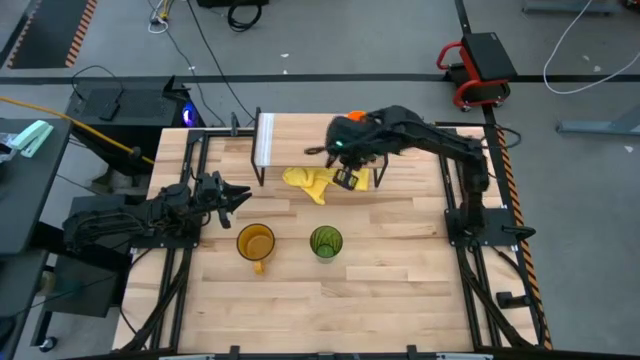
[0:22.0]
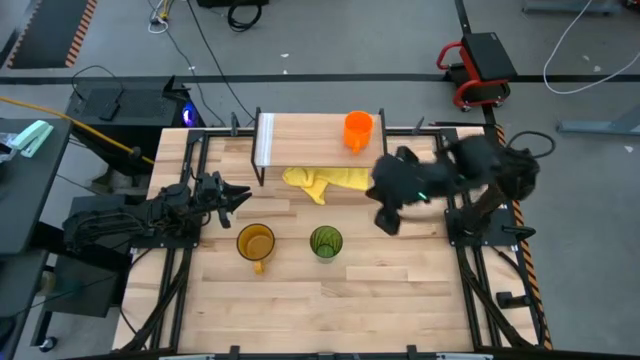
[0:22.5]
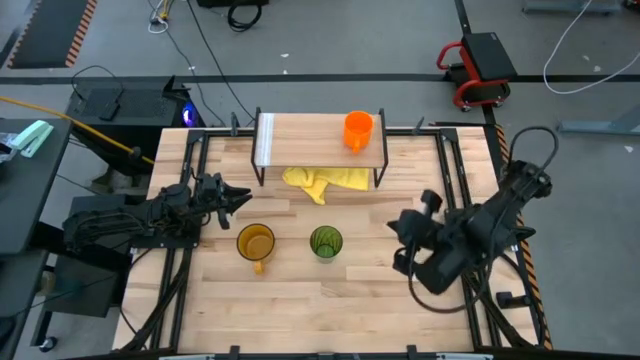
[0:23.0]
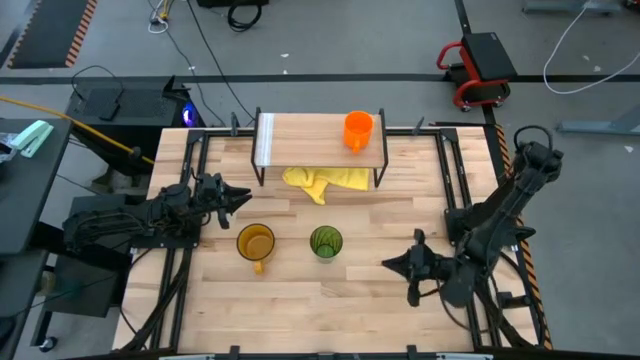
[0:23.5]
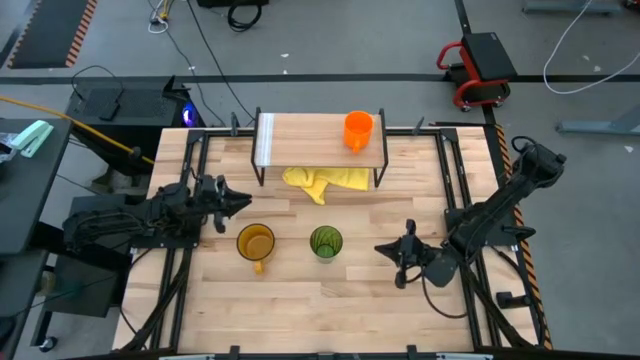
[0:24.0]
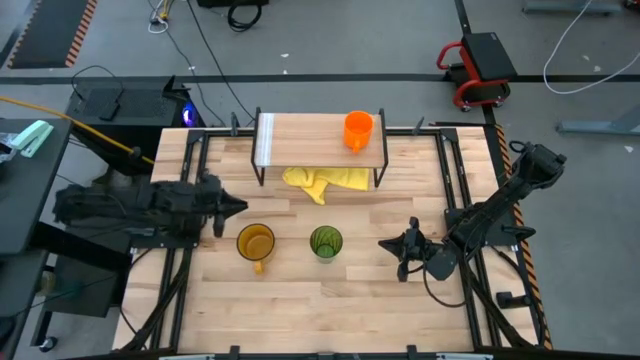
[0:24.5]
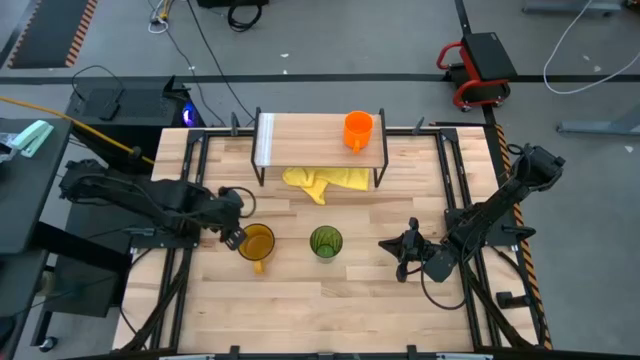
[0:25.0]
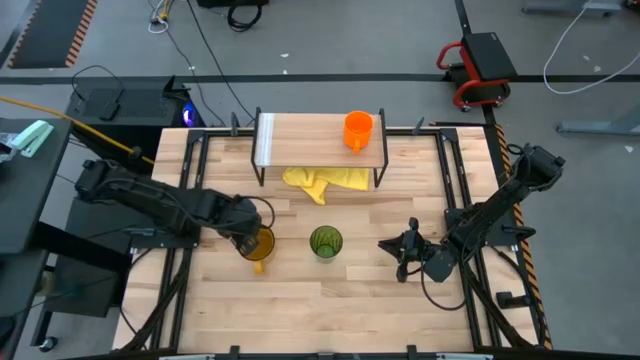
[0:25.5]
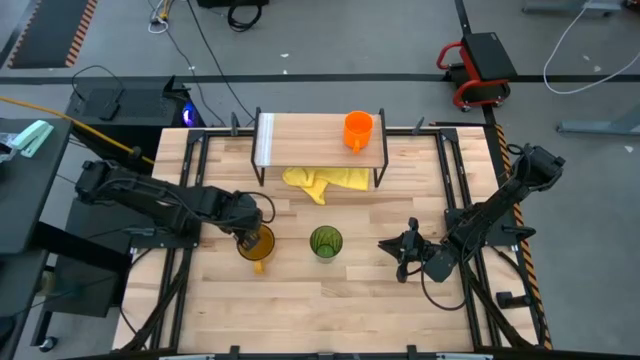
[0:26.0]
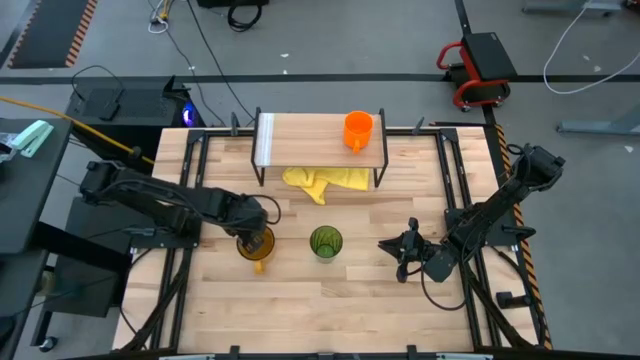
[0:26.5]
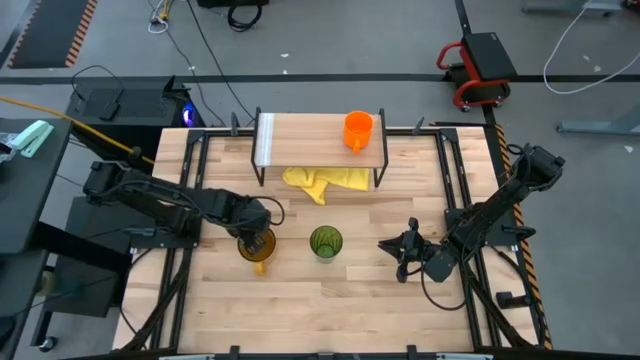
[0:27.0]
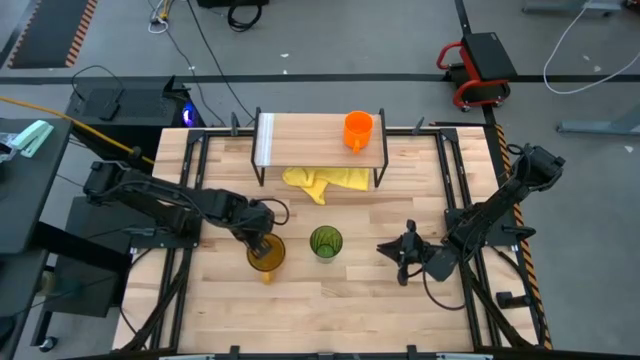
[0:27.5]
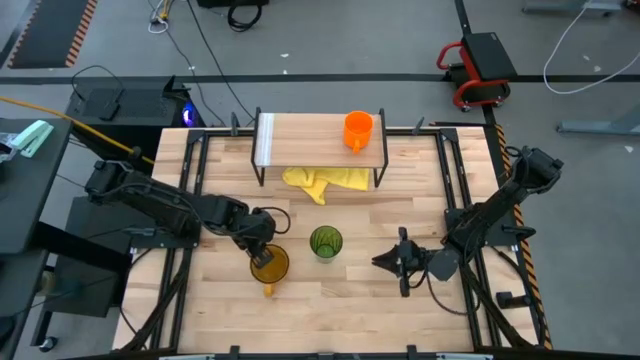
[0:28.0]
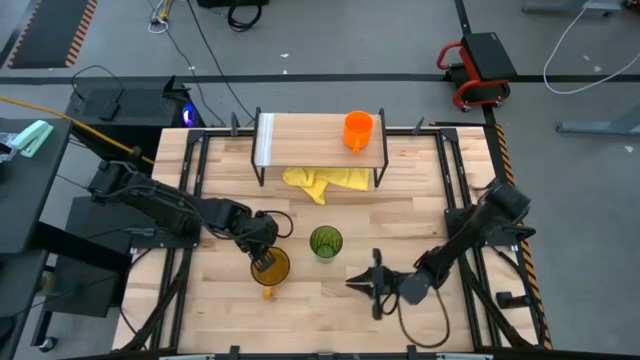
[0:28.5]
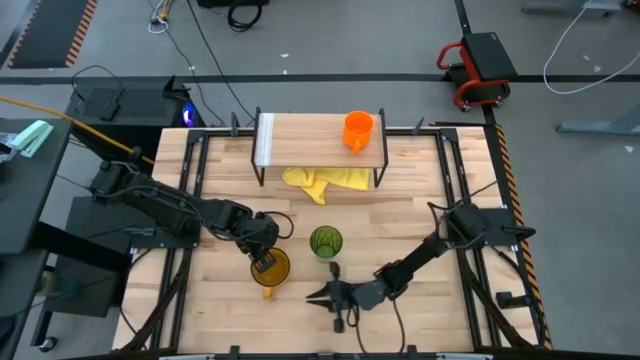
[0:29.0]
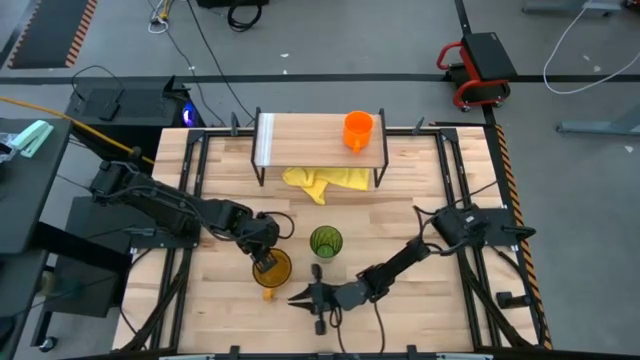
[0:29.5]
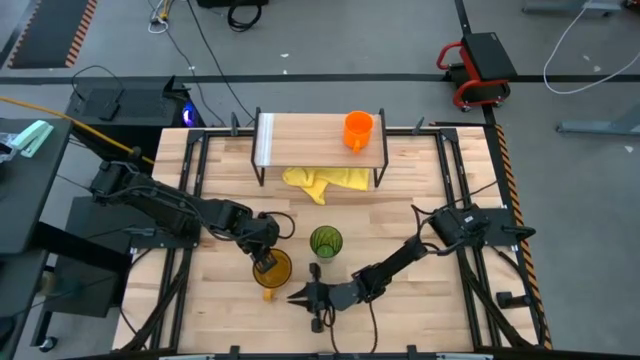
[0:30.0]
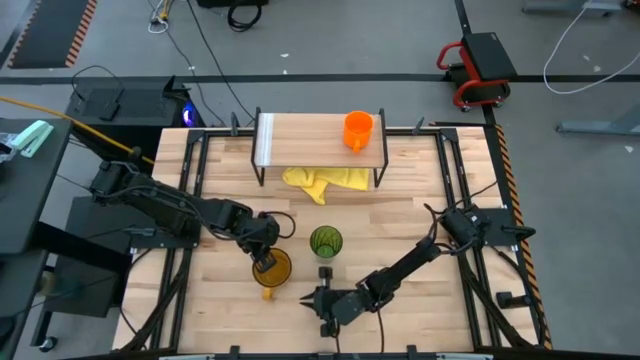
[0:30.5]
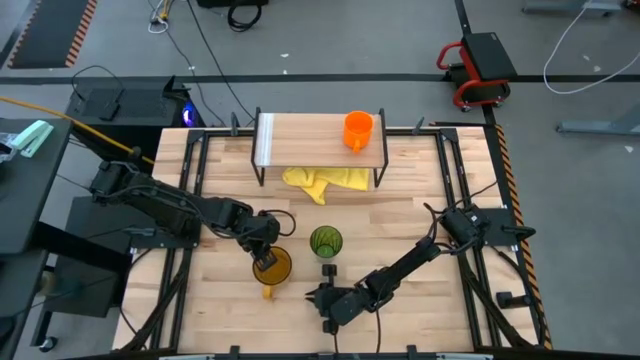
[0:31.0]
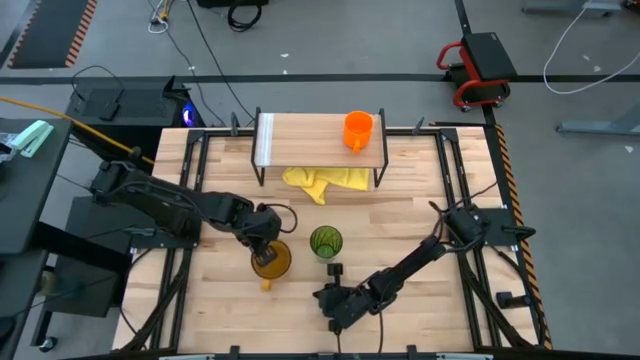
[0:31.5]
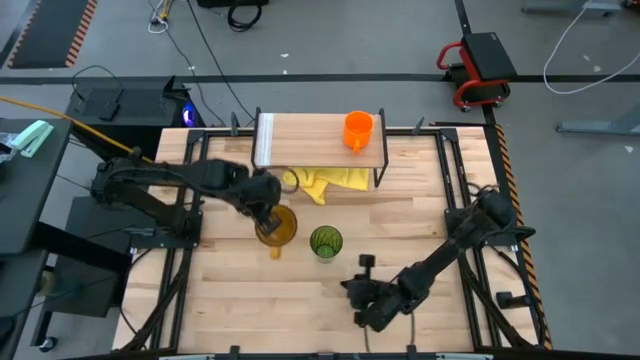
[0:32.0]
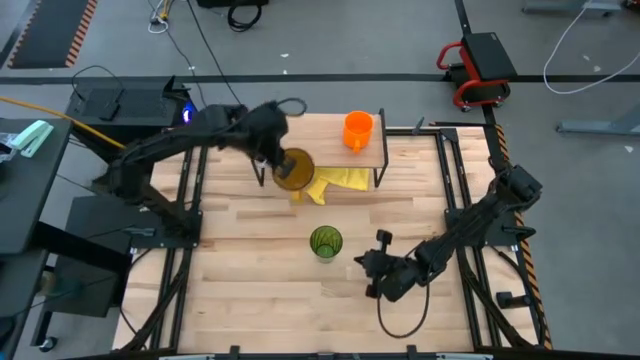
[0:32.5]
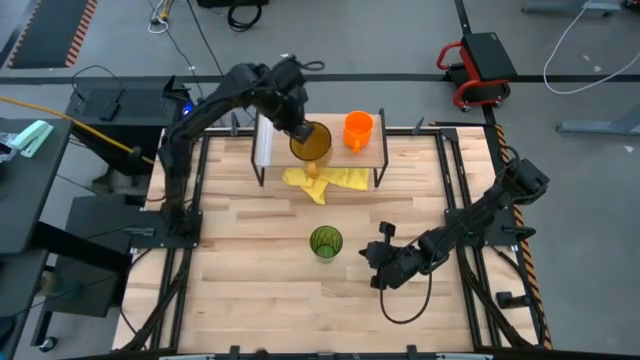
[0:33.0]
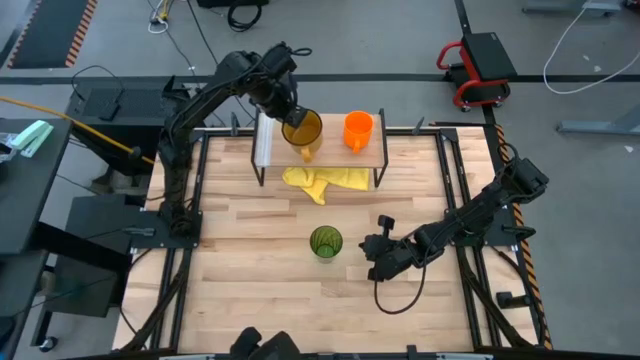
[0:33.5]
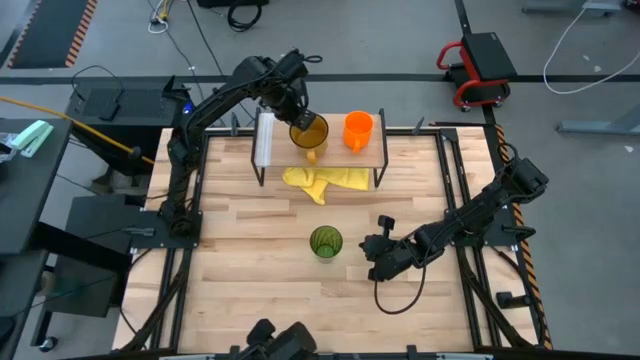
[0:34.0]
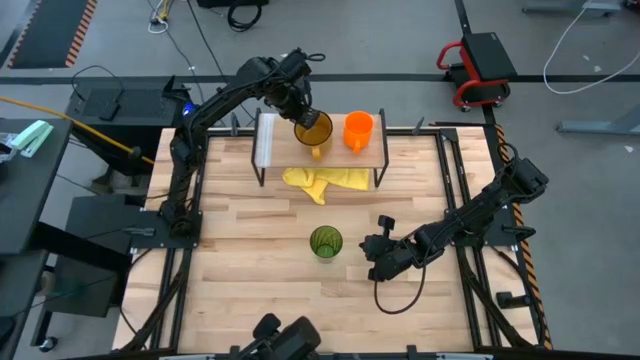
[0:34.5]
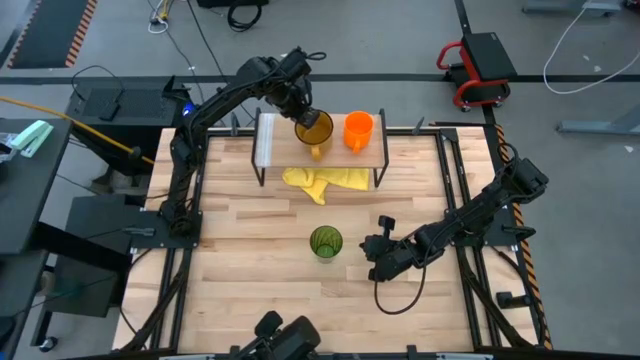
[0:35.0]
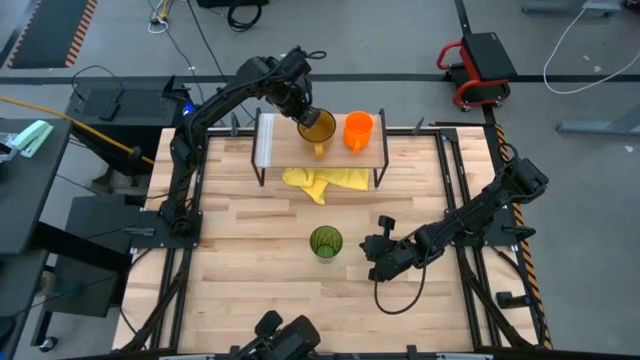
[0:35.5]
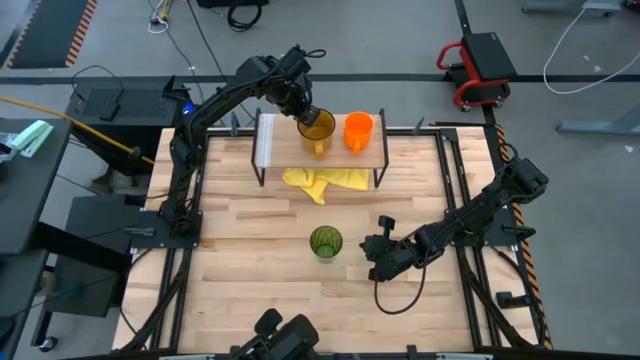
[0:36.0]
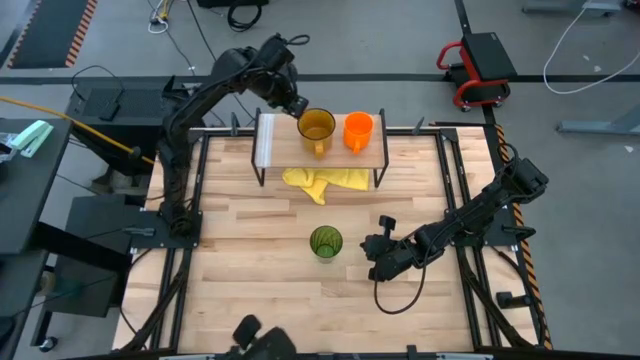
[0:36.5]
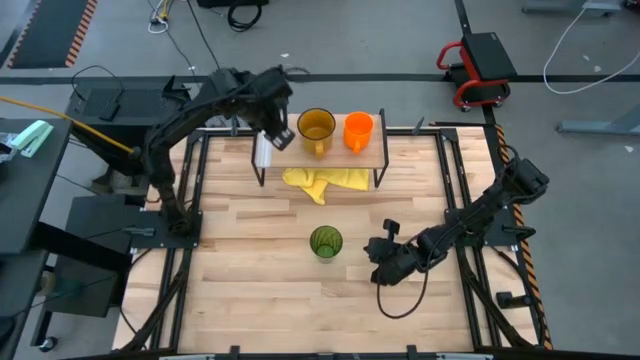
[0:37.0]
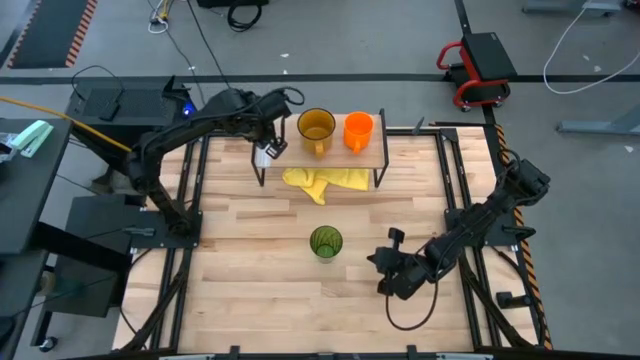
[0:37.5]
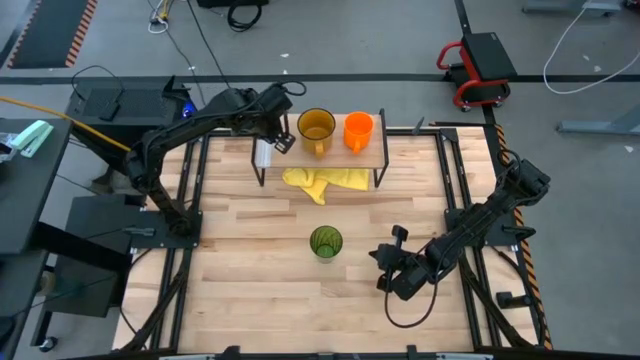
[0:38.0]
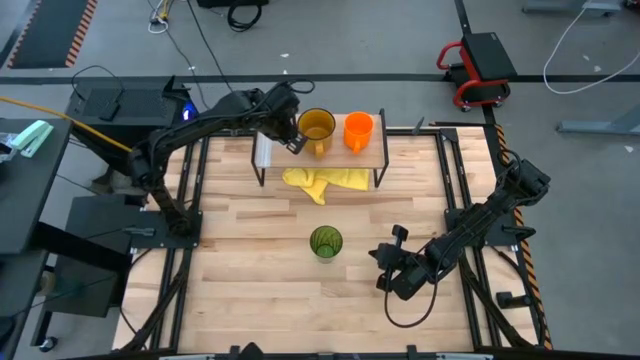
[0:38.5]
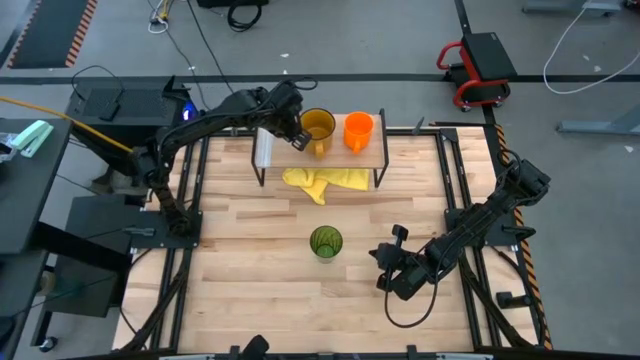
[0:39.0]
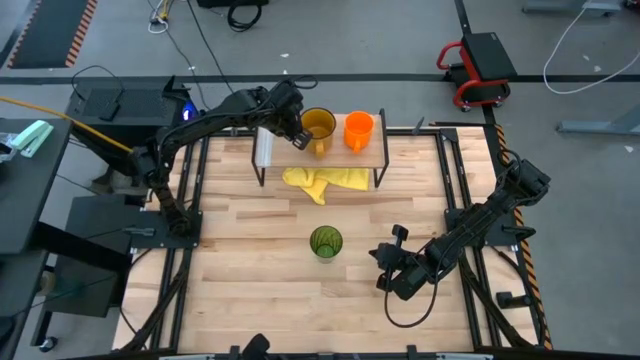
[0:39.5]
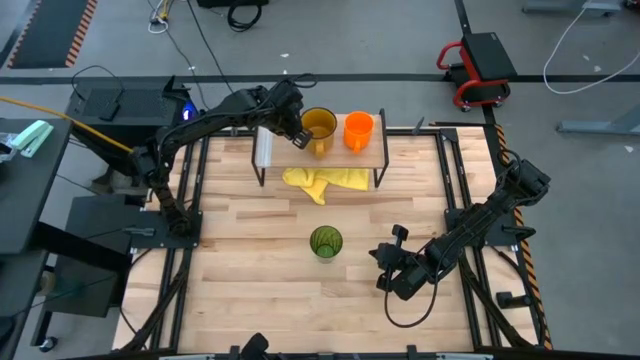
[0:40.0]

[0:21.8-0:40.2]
Task: Stack small to large cups/mugs on shelf
Put the yellow mug on the shelf

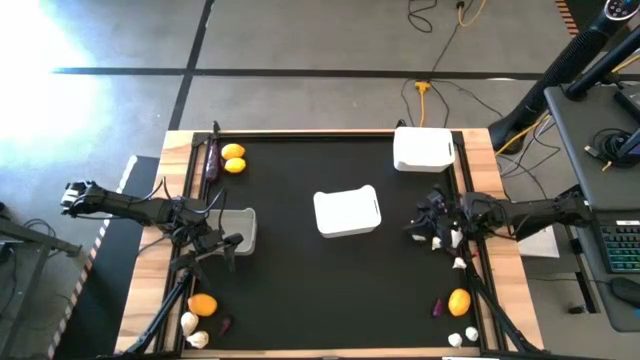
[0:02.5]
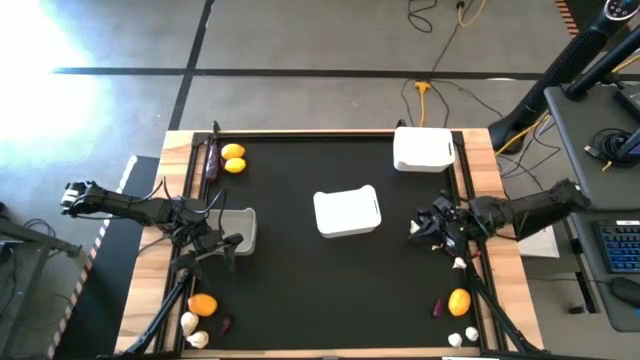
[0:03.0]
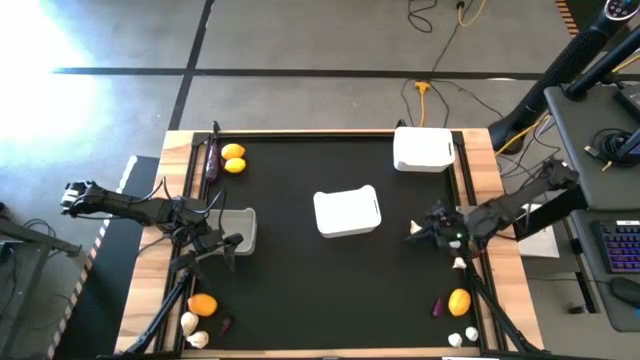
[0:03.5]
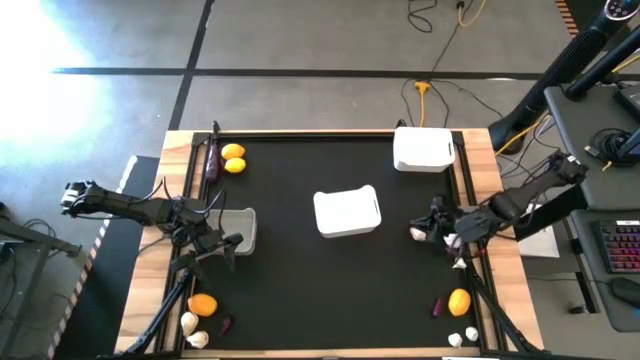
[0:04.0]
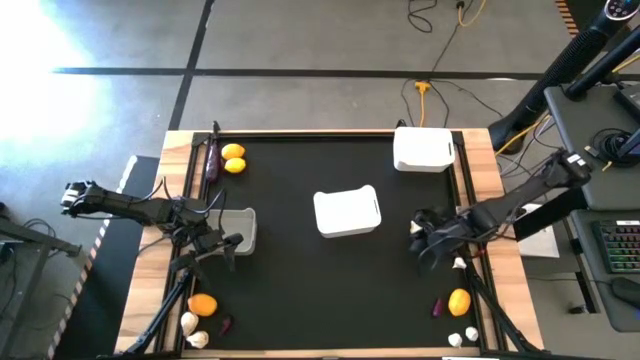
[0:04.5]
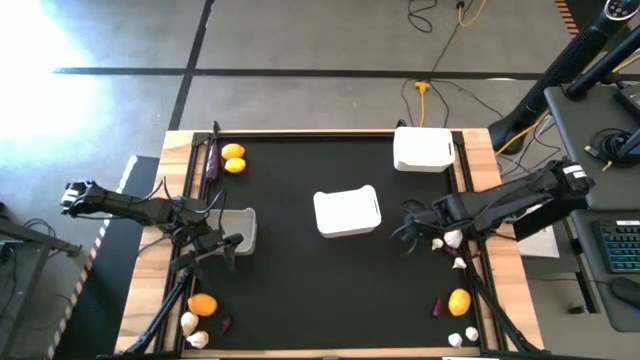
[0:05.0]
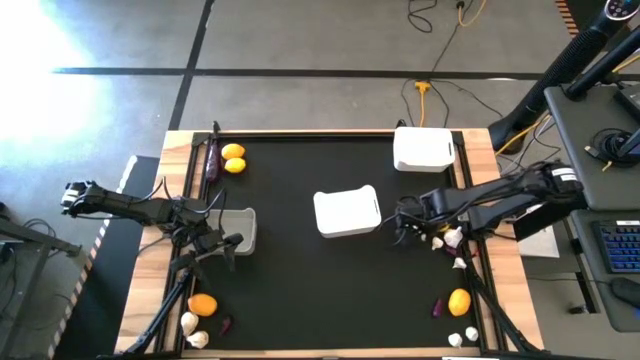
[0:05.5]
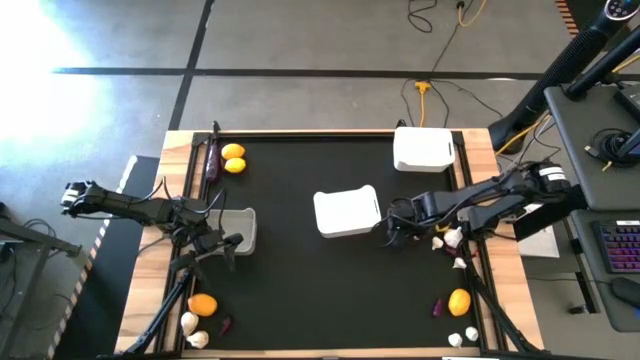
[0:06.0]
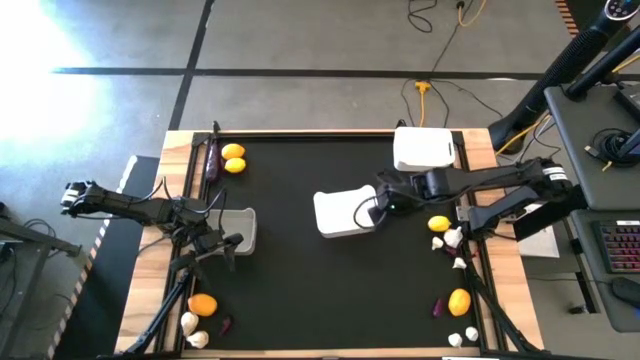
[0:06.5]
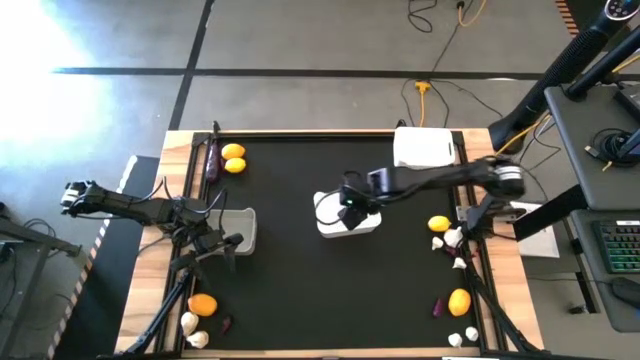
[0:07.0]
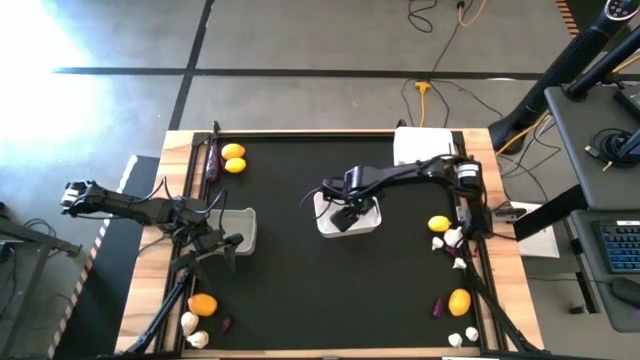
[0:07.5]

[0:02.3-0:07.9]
Task: Sort produce into baskets
Put the white garlic into the bottom white bin
